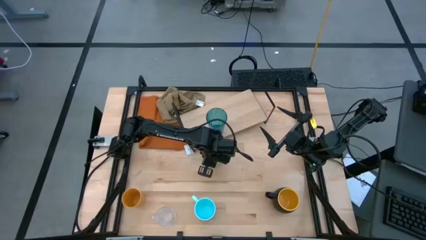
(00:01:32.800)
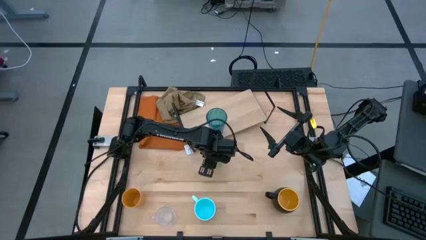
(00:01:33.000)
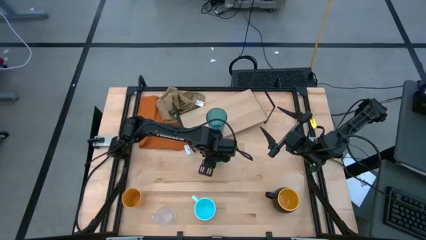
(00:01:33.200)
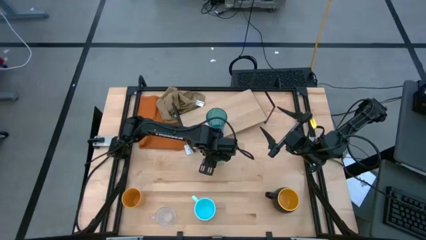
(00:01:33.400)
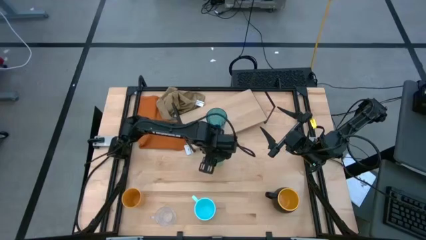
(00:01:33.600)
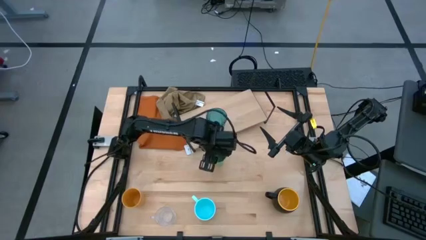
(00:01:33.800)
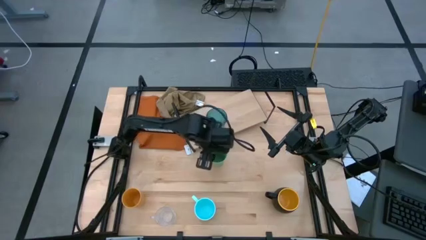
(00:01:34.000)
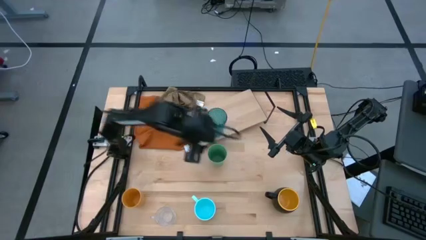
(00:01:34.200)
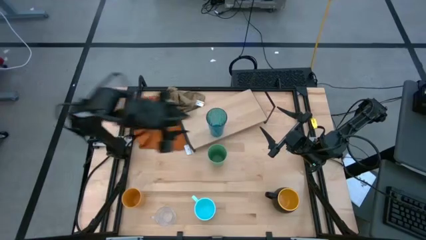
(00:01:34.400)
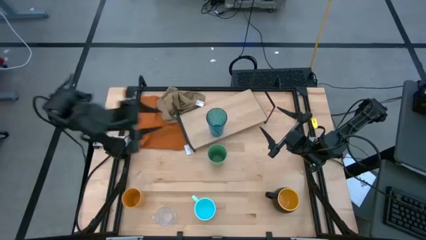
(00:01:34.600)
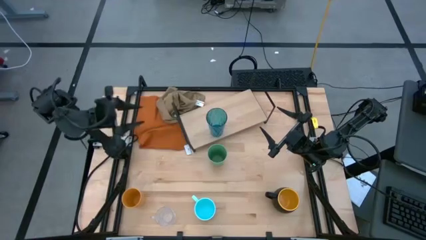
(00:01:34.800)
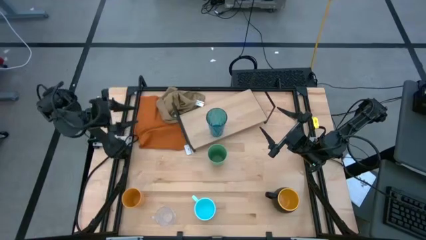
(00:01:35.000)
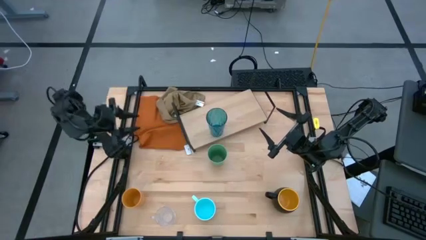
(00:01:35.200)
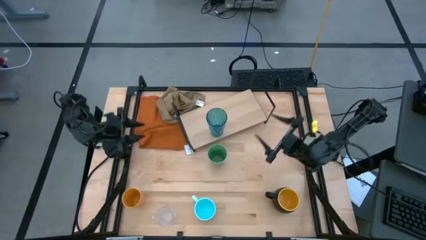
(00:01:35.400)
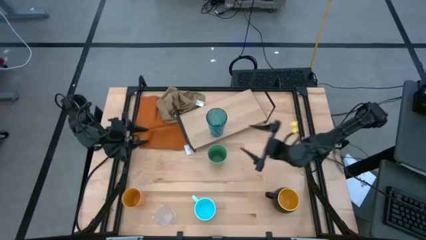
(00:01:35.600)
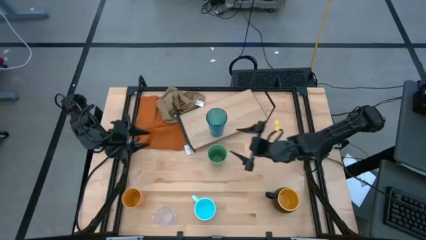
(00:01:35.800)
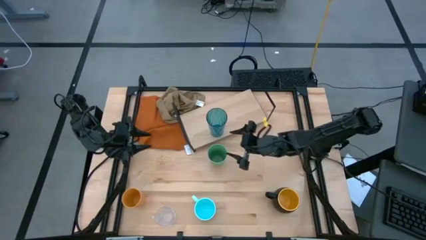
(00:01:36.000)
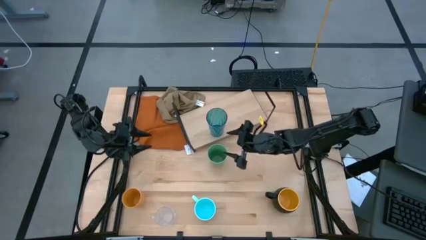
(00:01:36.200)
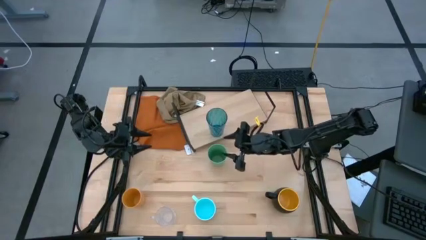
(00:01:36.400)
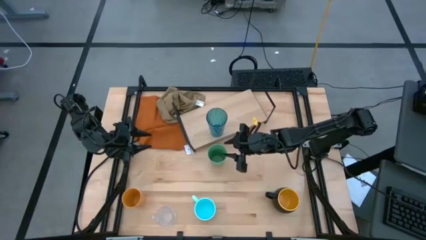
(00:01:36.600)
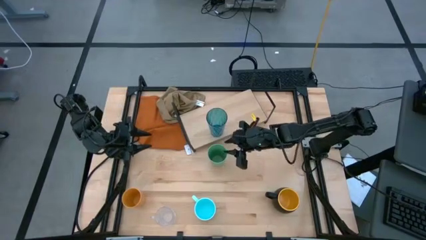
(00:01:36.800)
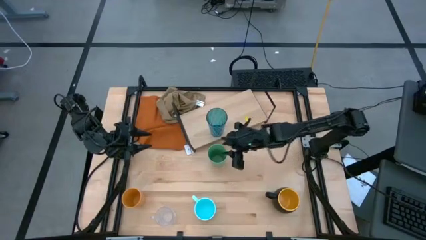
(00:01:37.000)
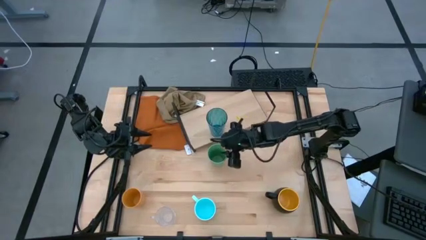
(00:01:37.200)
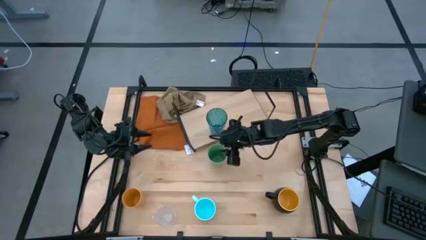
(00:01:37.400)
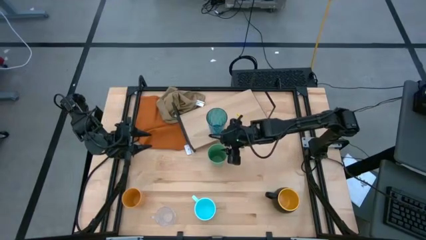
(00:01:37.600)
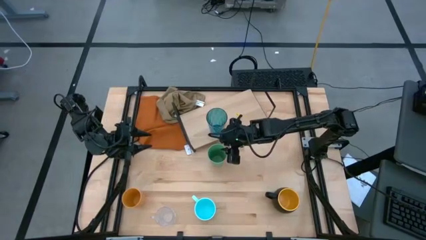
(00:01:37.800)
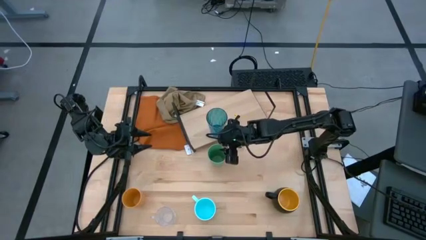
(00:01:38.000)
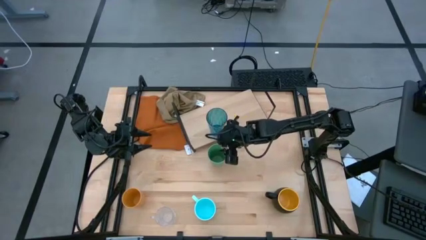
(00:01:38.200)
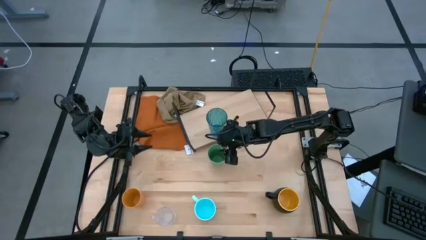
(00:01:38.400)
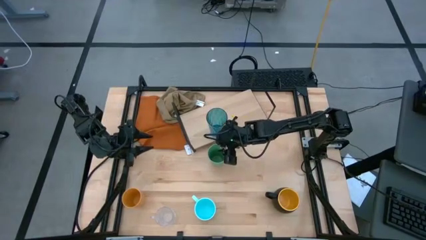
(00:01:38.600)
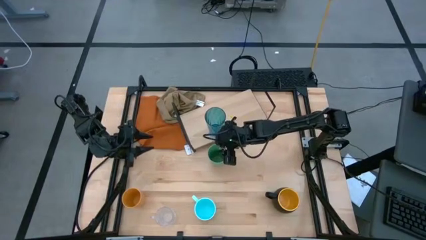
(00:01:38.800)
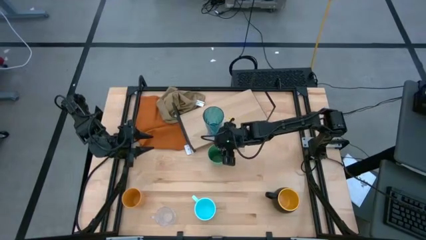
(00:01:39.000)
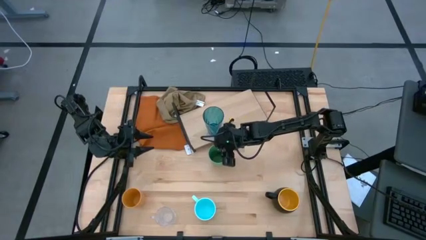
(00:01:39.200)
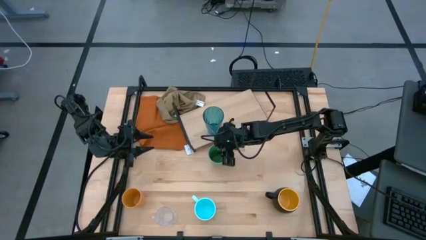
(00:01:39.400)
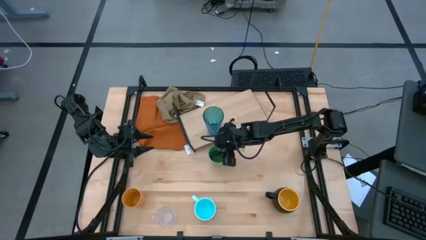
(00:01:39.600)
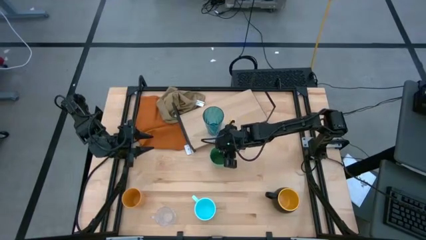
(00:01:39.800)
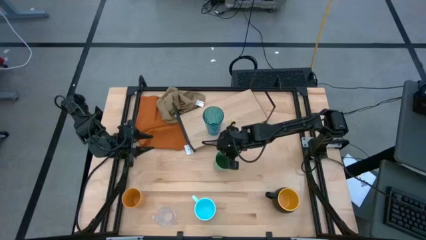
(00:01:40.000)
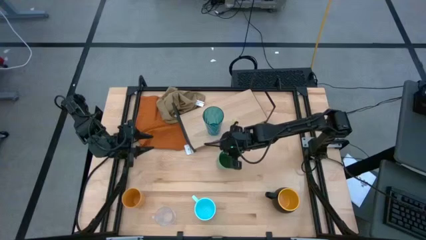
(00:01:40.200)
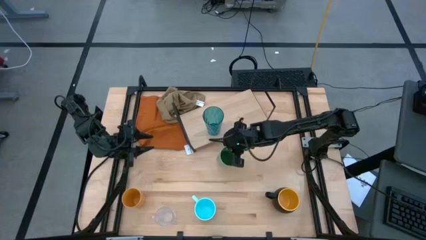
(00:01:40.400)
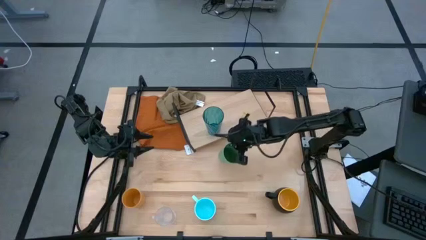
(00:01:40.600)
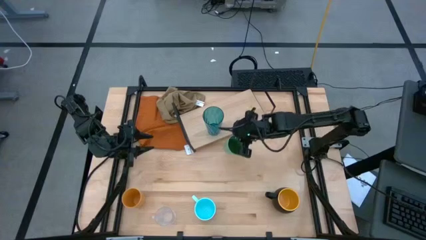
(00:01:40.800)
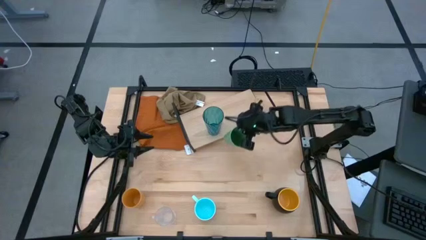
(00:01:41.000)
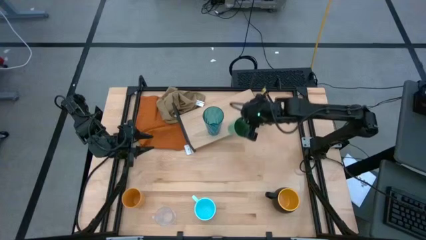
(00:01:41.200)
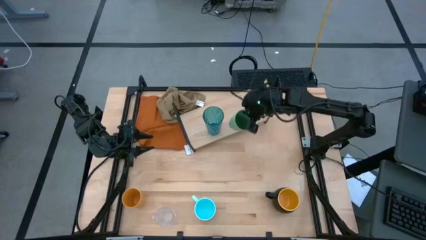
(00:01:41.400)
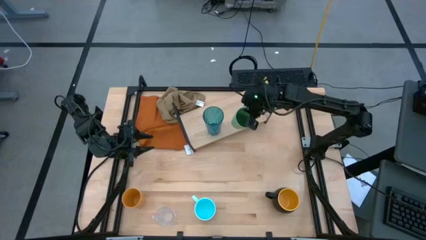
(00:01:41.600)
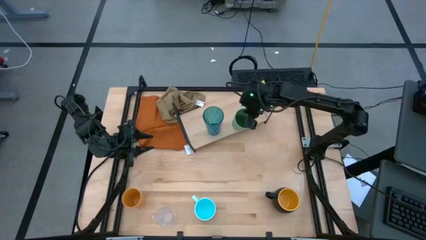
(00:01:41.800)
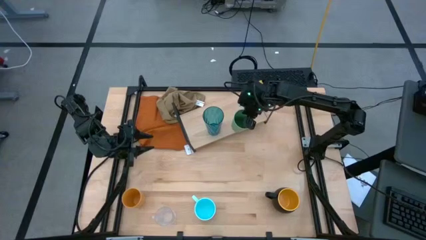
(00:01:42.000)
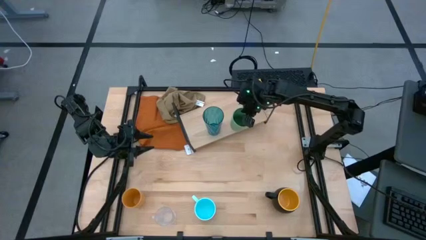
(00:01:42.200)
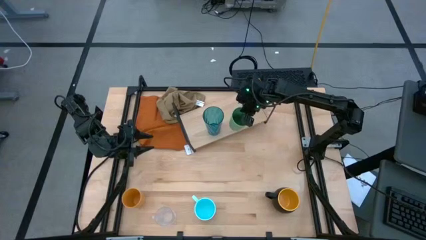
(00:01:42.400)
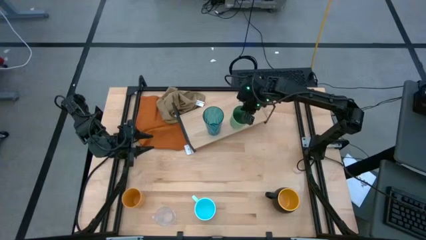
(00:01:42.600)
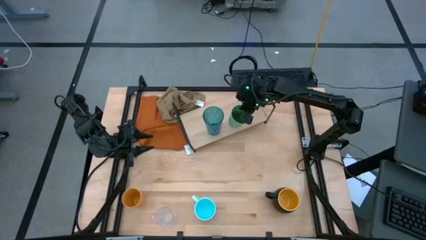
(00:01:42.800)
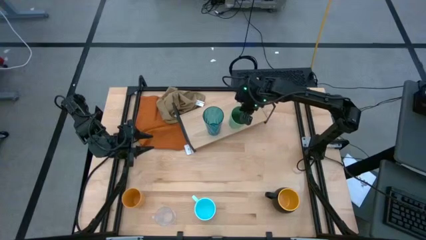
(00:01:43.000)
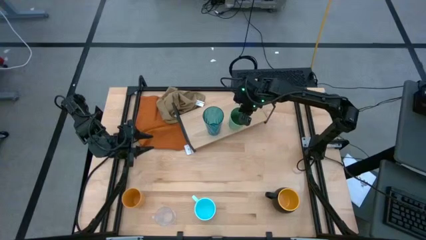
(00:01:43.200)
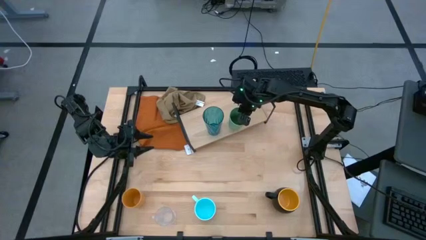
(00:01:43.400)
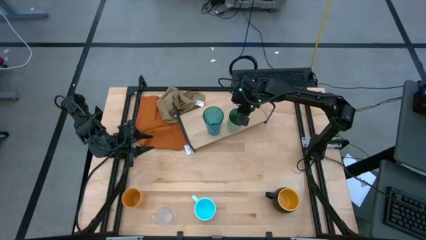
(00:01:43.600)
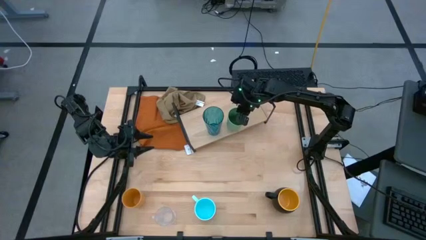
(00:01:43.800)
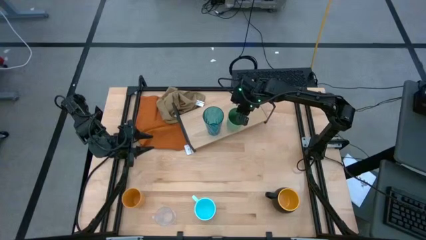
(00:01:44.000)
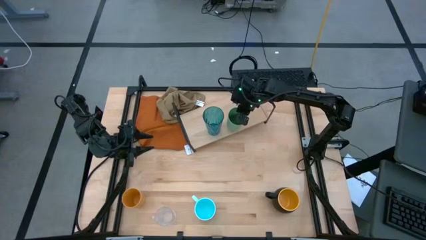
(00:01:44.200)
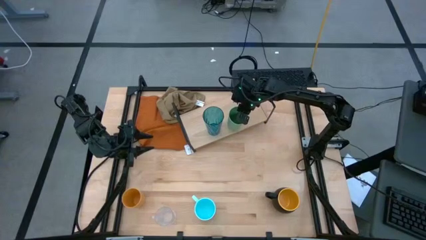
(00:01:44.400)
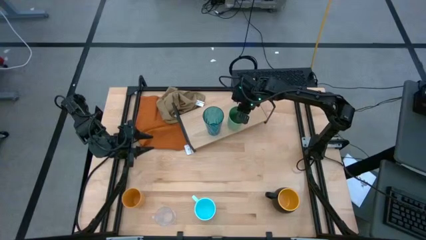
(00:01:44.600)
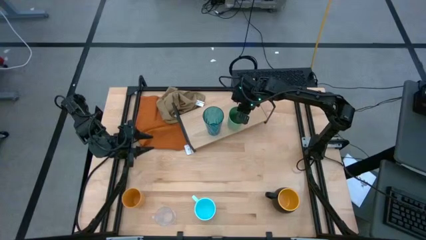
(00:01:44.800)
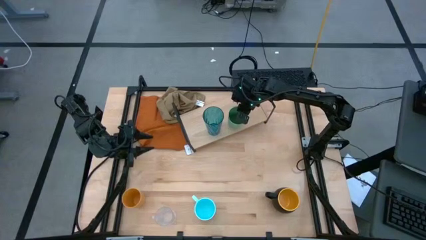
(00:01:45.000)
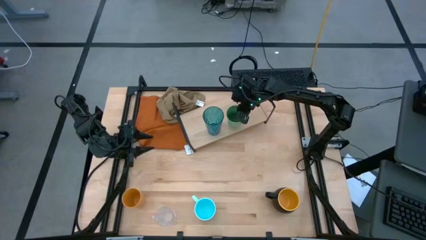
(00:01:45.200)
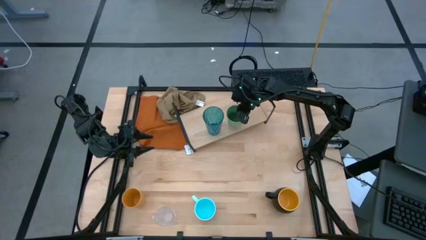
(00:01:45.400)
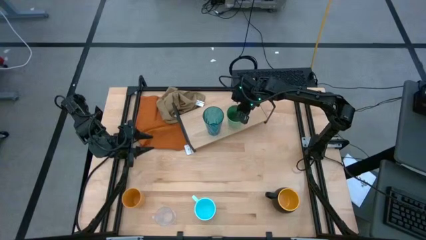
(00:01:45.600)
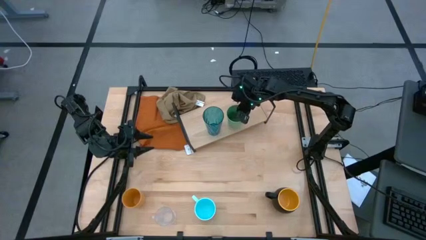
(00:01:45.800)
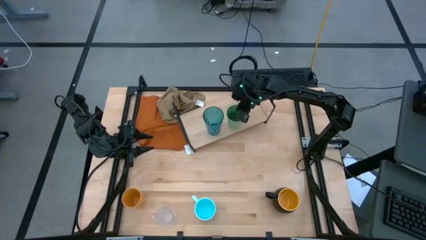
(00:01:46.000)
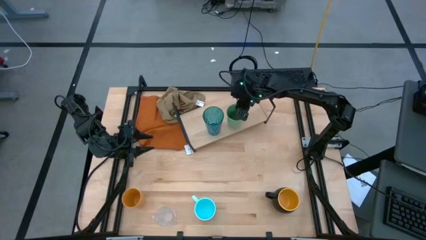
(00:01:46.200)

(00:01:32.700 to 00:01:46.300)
Task: Stack small to large cups/mugs on shelf
Put the green cup on the shelf
